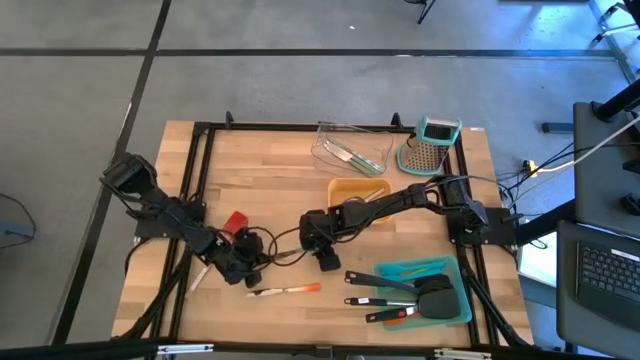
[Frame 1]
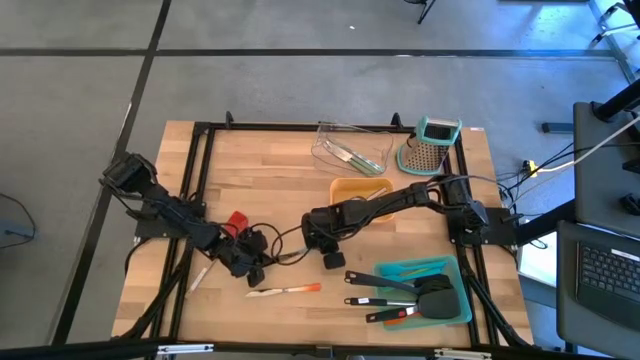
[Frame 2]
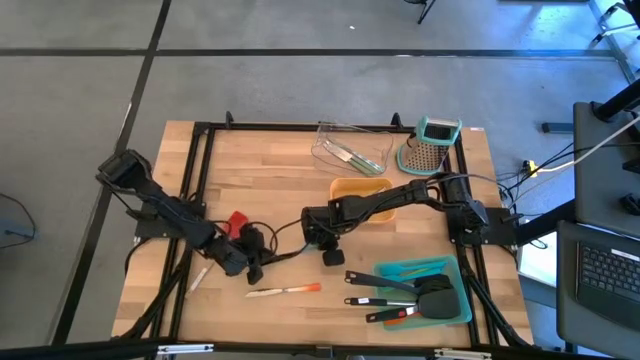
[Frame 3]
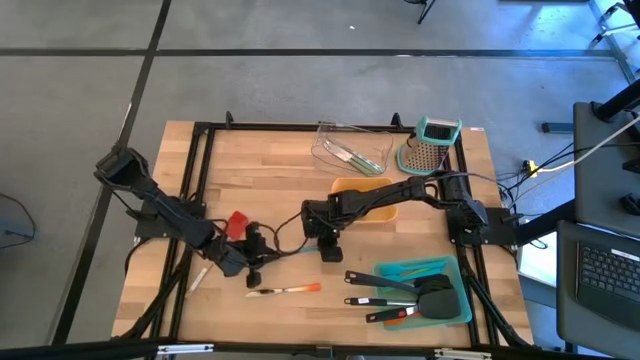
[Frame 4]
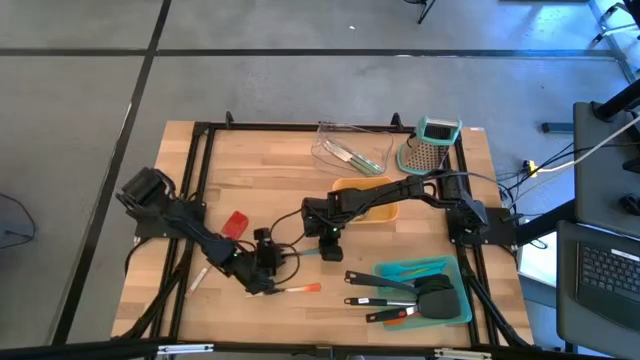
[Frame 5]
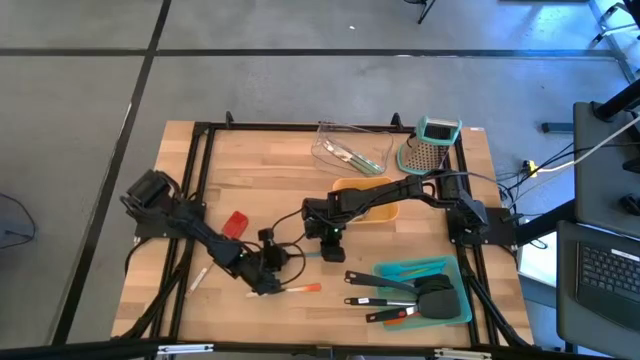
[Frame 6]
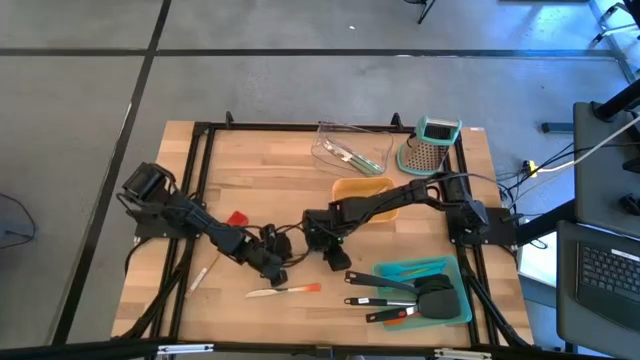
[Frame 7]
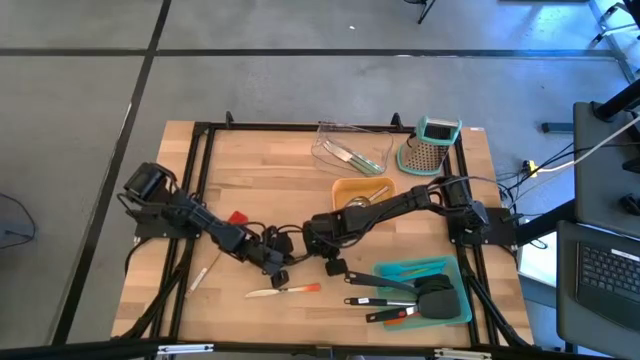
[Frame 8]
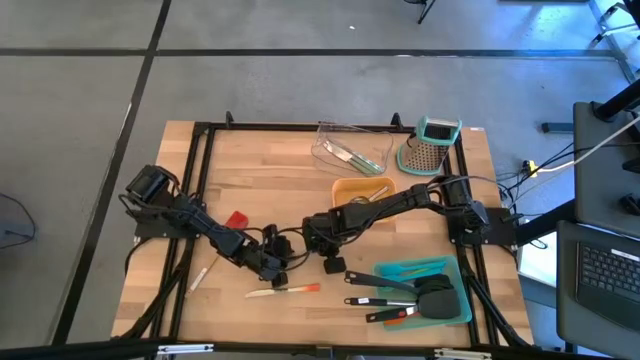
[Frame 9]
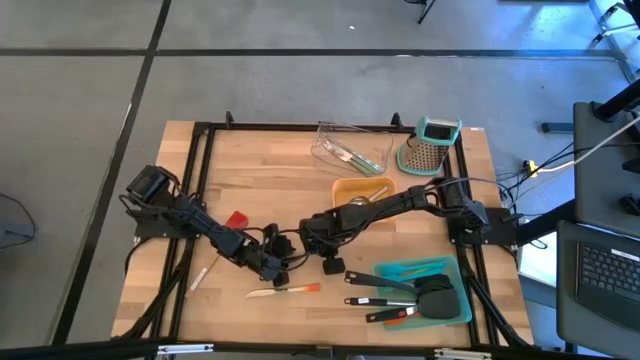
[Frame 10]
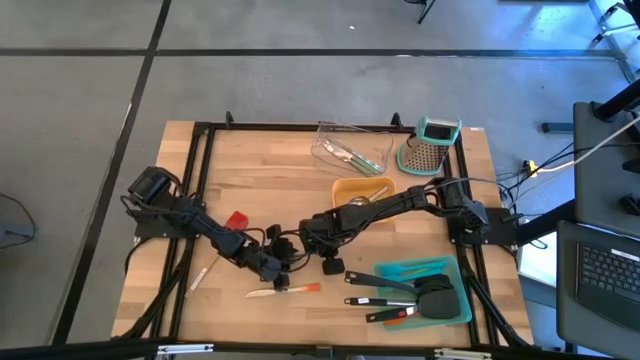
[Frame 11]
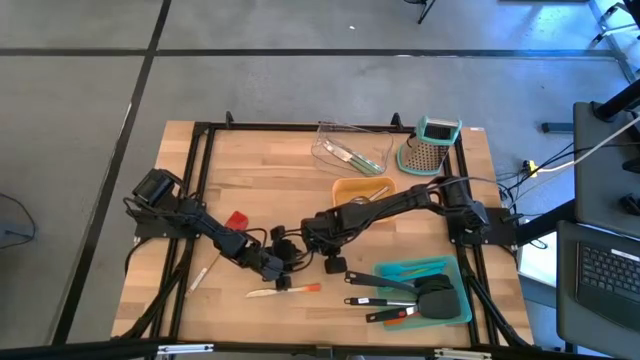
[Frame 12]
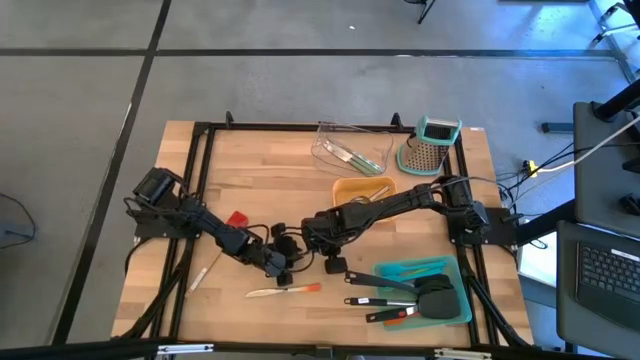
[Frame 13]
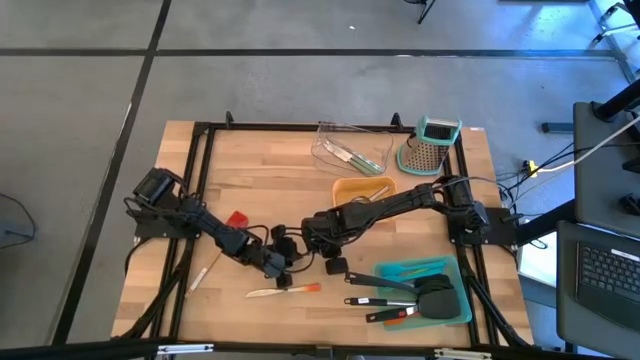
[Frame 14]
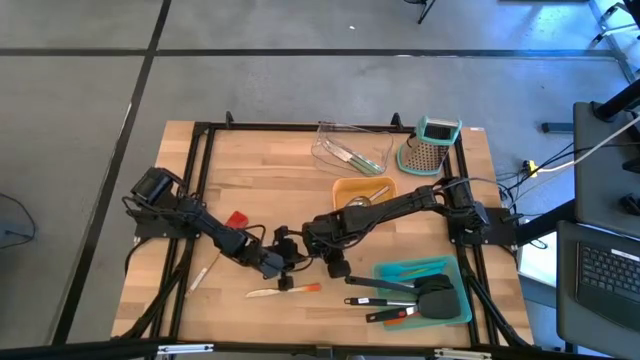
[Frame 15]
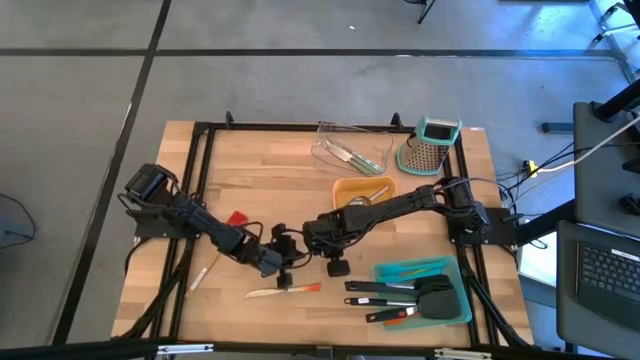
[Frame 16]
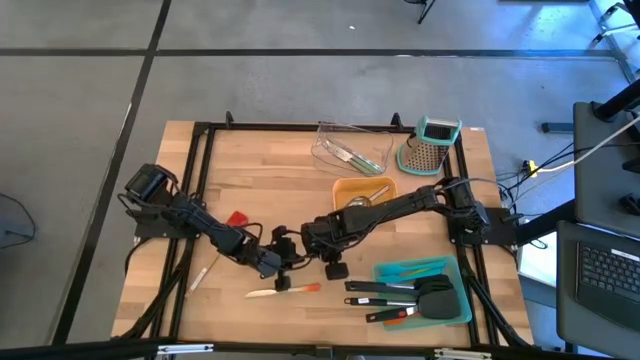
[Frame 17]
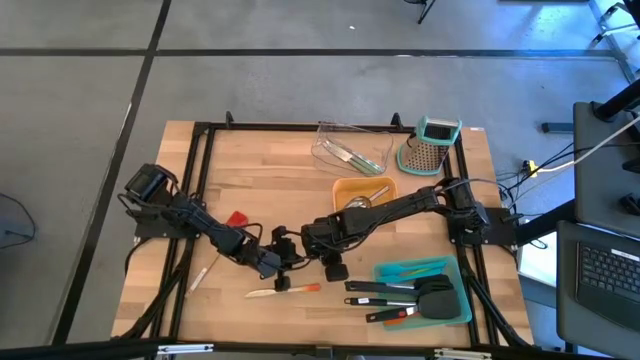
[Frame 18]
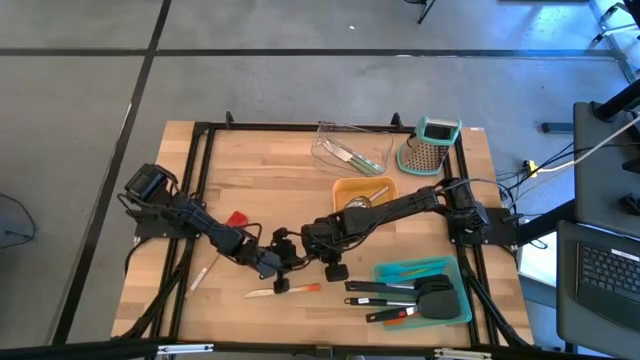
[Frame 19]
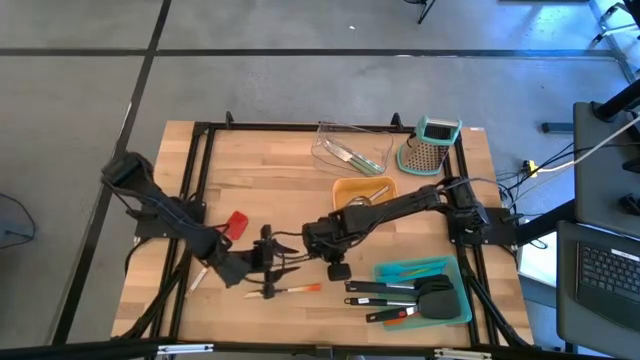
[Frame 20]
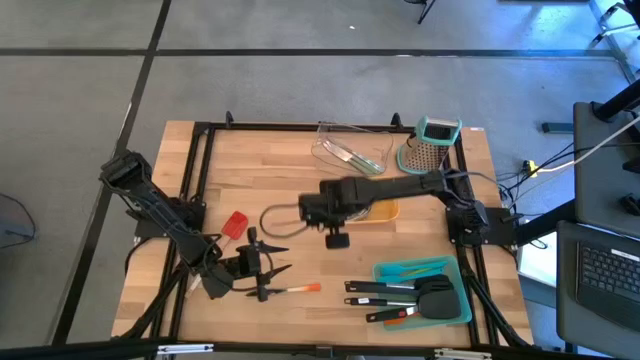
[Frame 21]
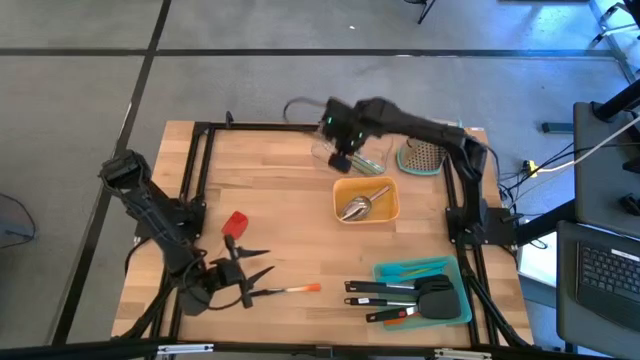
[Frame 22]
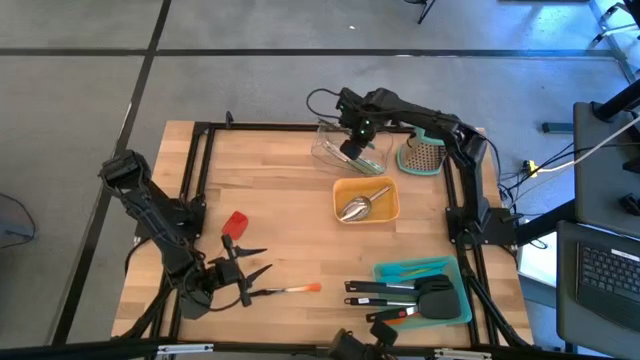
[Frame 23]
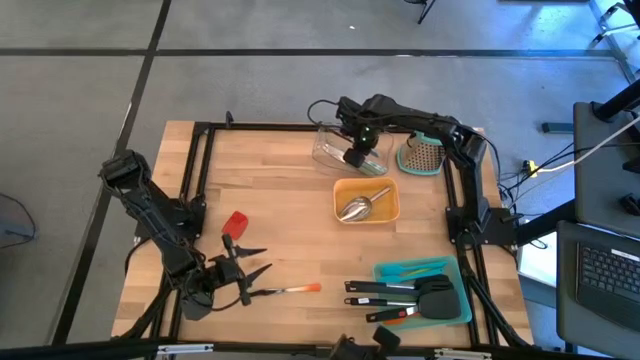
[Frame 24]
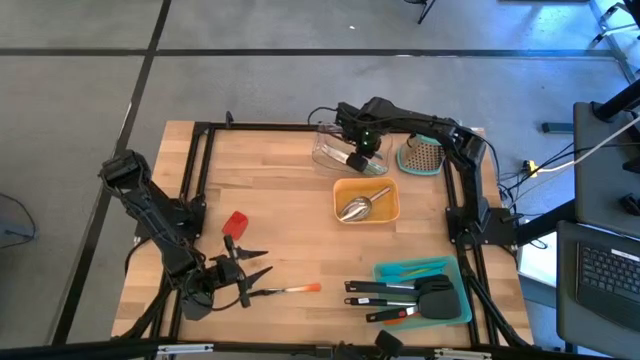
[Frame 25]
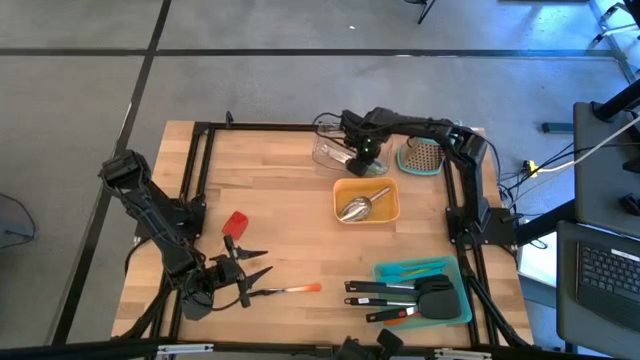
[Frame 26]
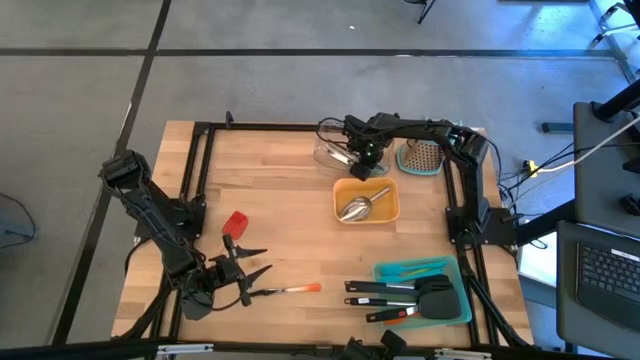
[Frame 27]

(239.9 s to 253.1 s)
Task: Pick & Place Kitchen Items
Put the blue knife into the transparent bin

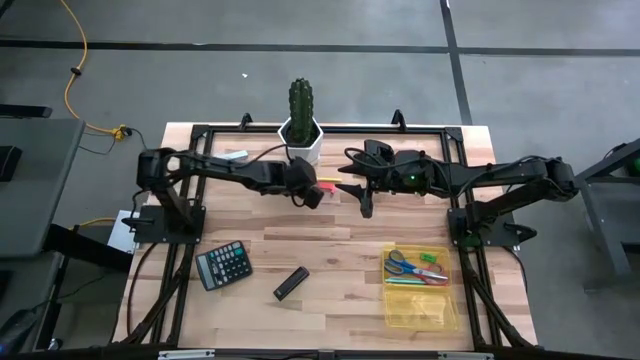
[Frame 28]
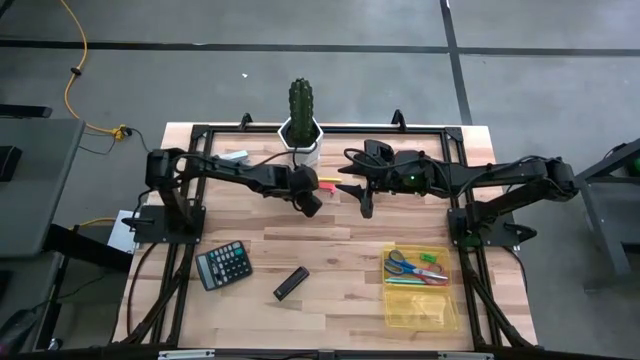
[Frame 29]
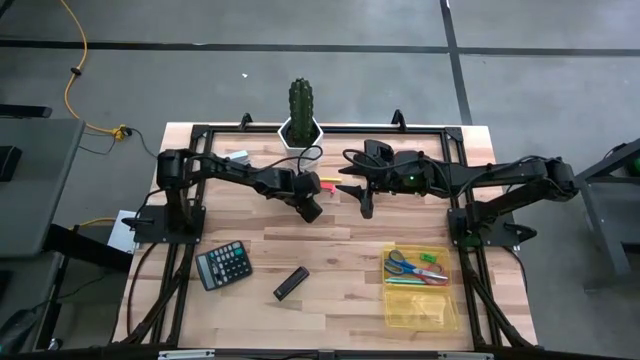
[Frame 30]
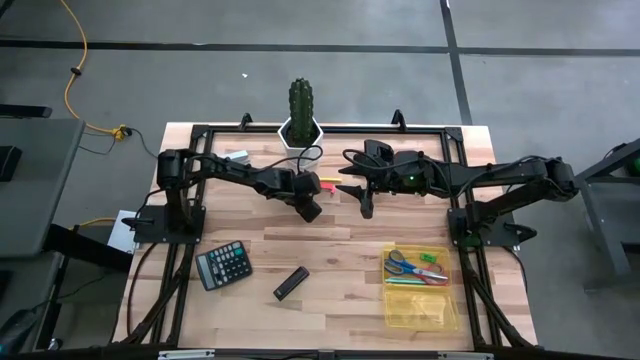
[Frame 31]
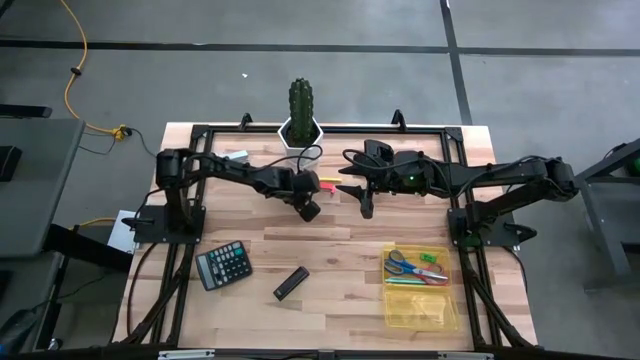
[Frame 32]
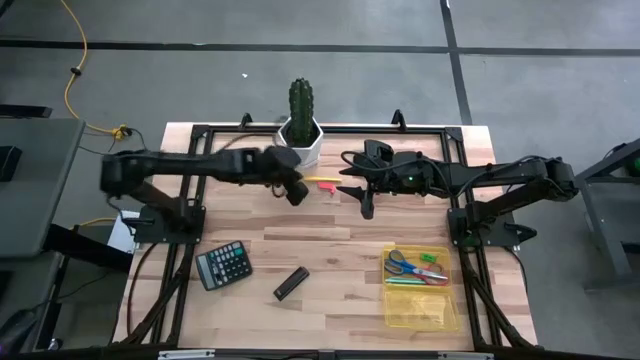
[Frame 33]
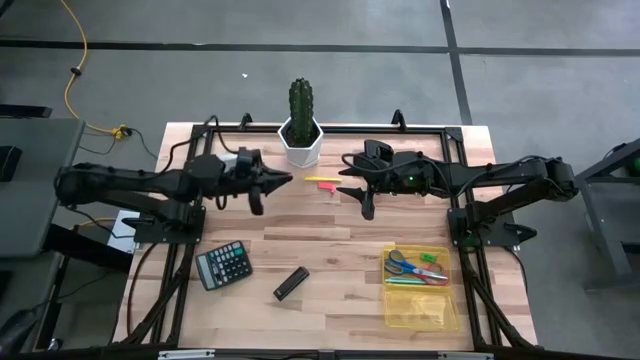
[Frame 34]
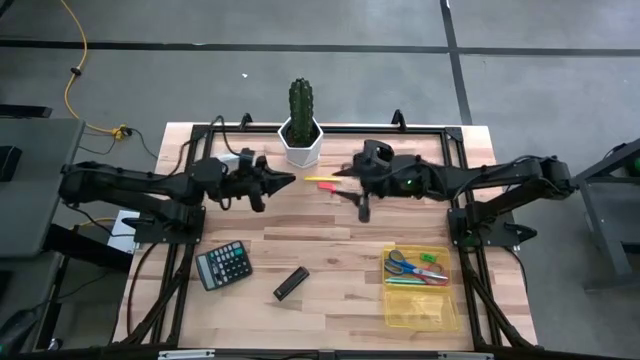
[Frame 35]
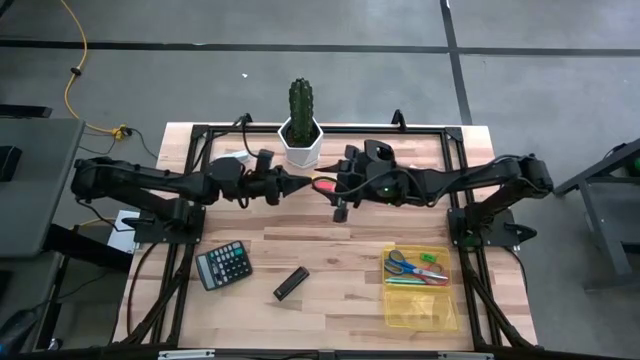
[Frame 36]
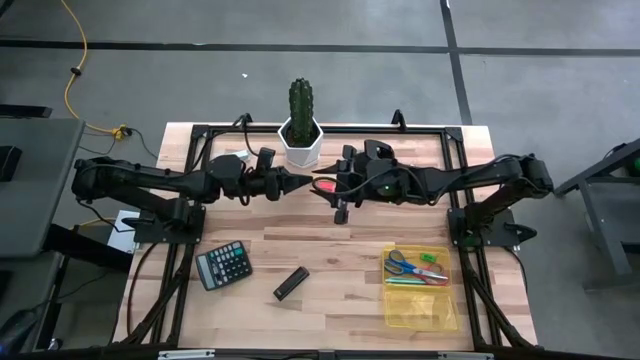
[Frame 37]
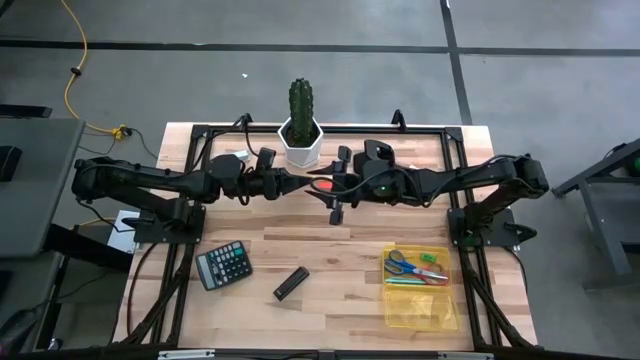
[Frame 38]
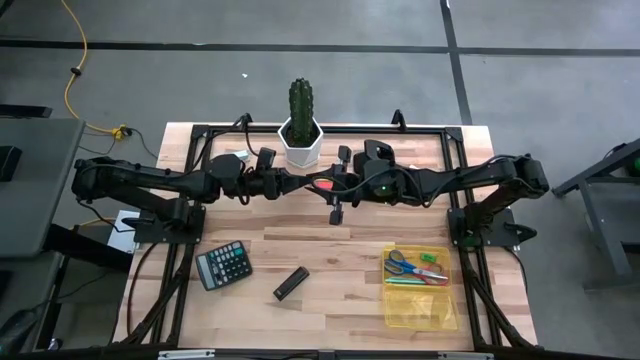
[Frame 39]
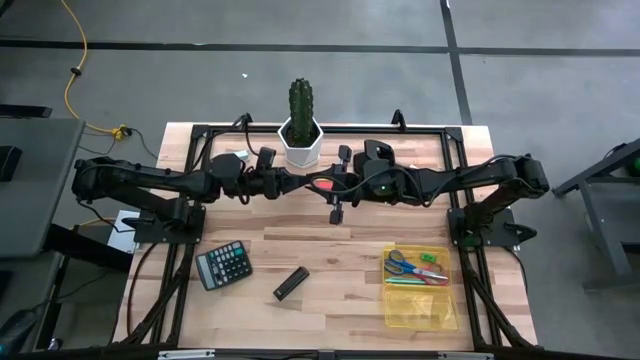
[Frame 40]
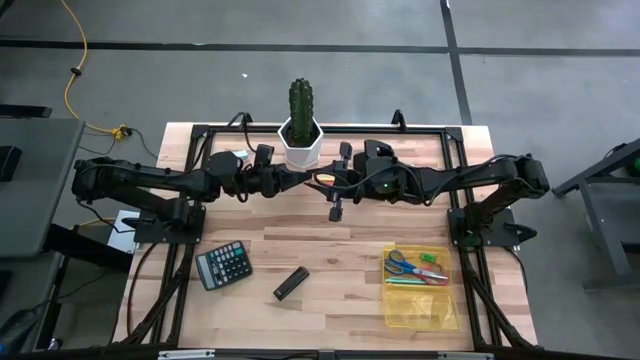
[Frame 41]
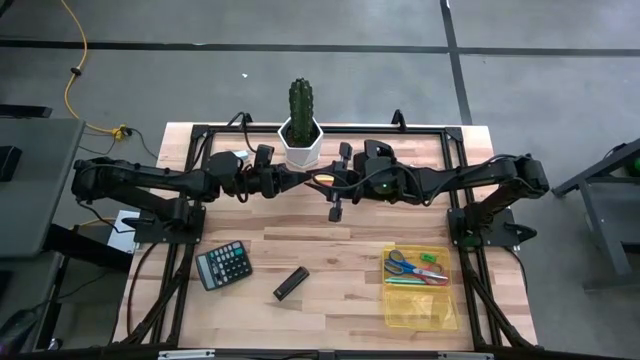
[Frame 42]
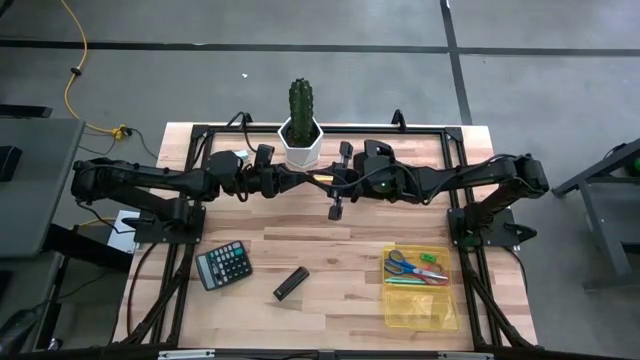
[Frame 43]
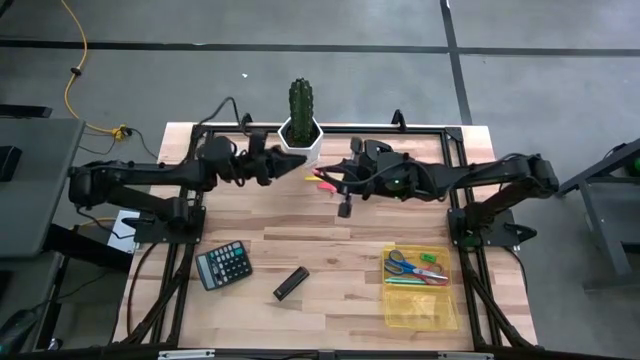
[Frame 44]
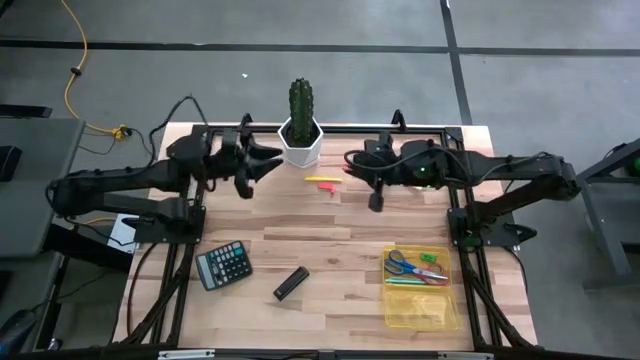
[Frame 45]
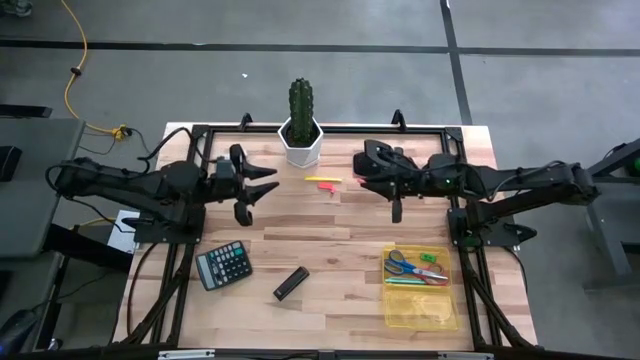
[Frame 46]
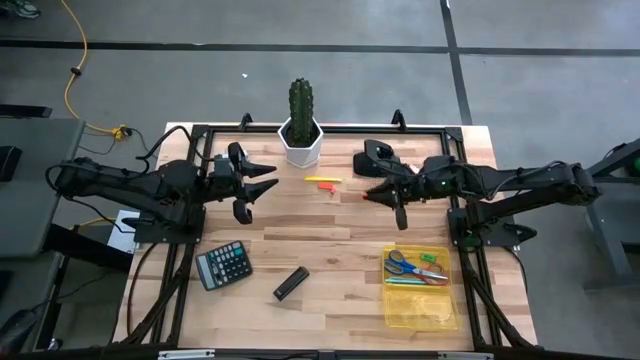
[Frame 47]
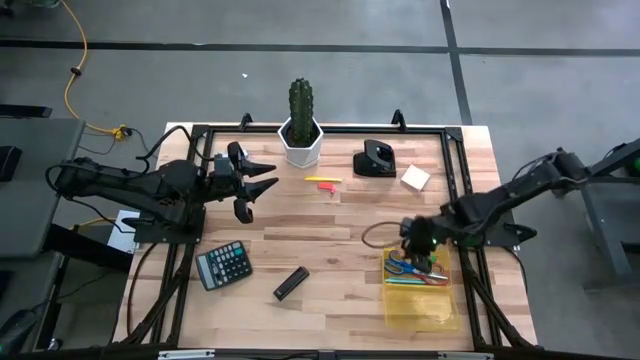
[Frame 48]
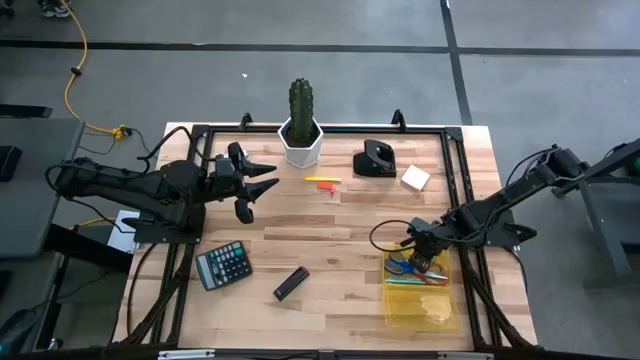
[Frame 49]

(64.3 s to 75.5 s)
Task: Pack school essentials
Put the small orange eraser on the yellow supply box
